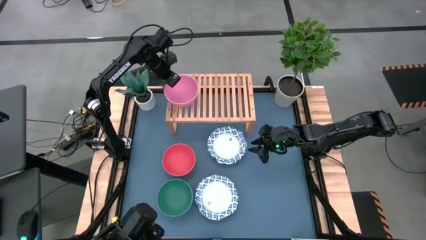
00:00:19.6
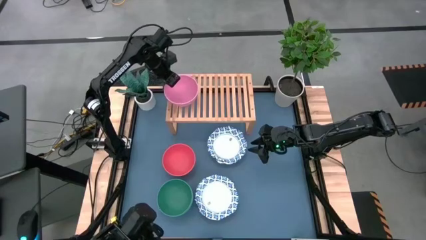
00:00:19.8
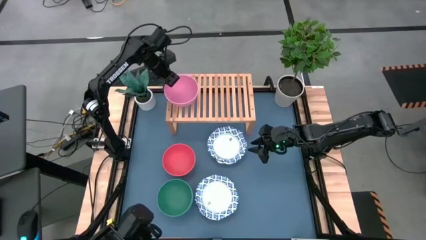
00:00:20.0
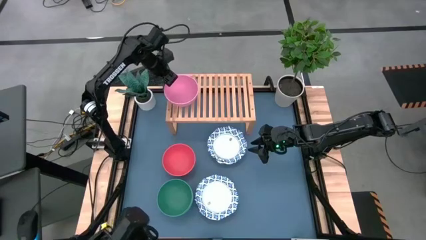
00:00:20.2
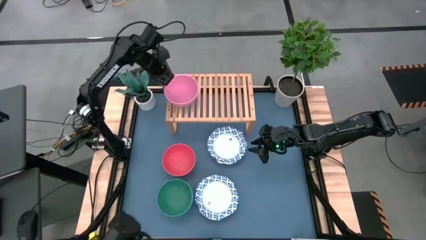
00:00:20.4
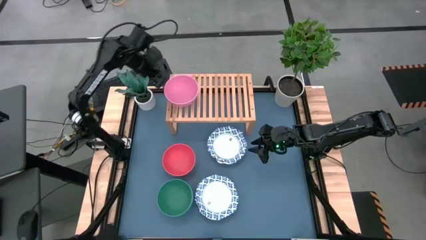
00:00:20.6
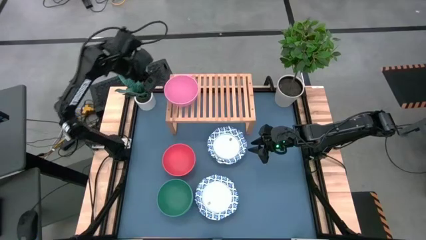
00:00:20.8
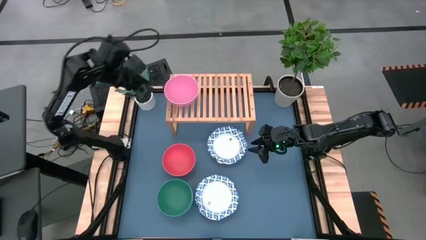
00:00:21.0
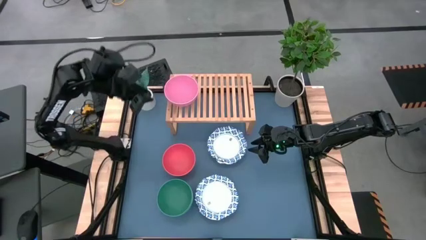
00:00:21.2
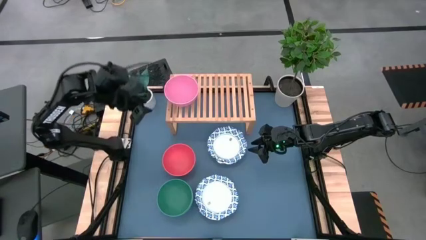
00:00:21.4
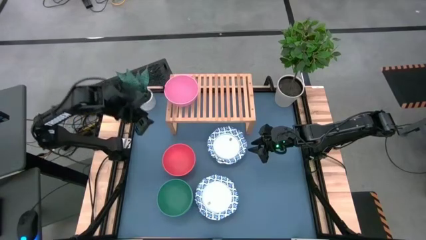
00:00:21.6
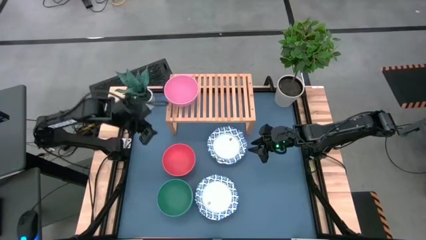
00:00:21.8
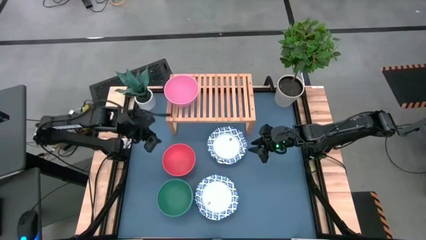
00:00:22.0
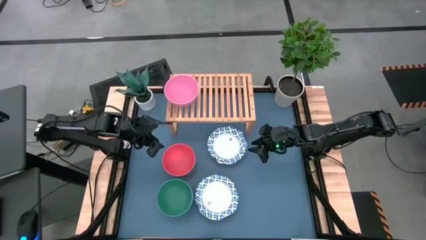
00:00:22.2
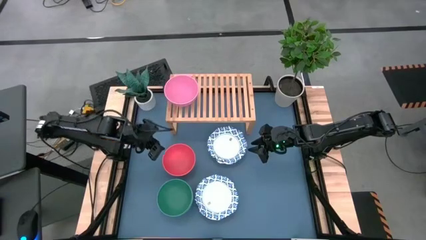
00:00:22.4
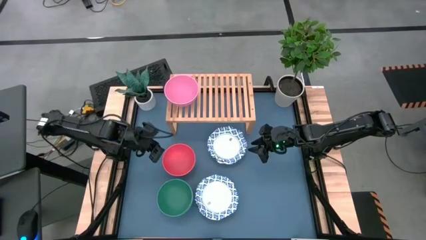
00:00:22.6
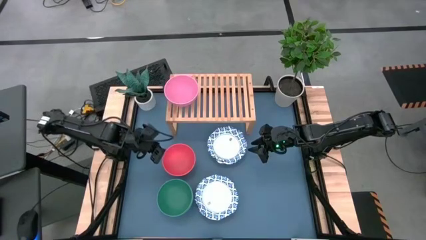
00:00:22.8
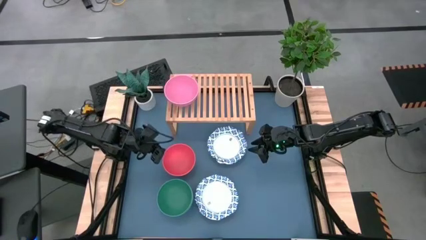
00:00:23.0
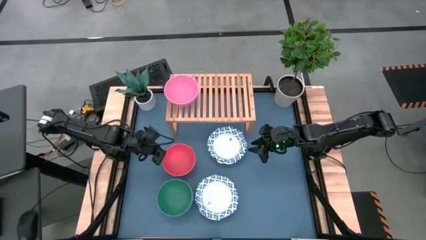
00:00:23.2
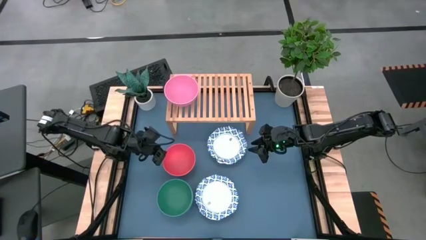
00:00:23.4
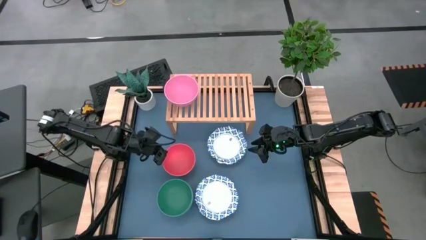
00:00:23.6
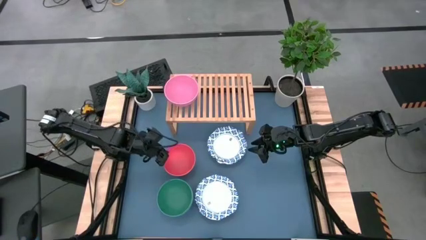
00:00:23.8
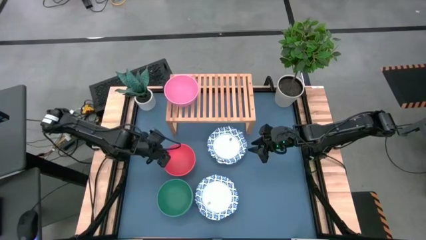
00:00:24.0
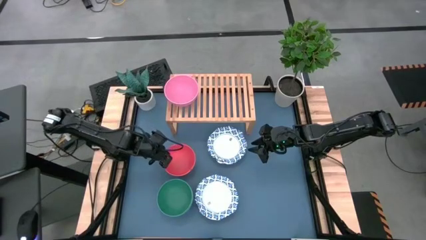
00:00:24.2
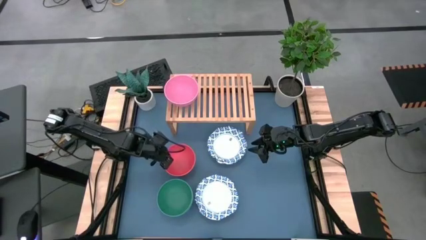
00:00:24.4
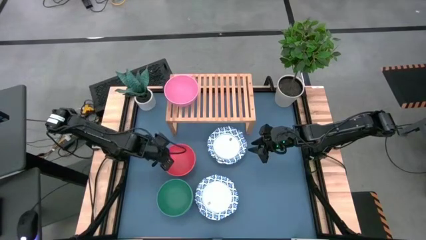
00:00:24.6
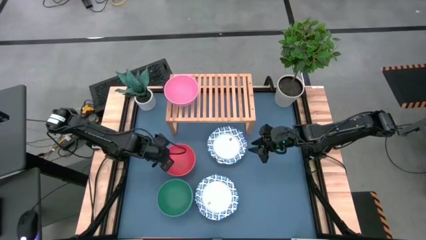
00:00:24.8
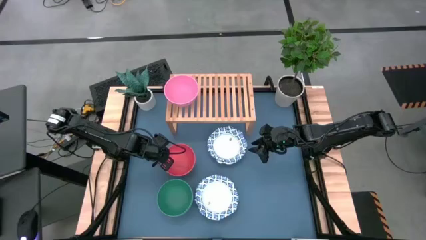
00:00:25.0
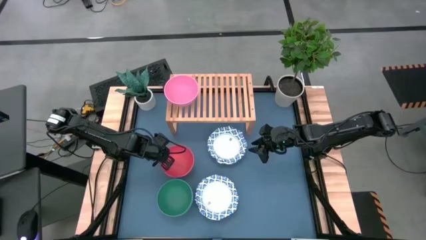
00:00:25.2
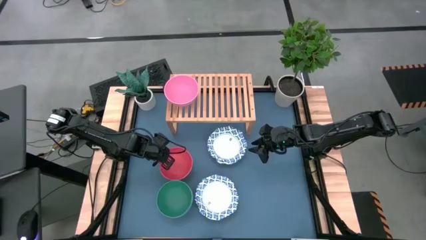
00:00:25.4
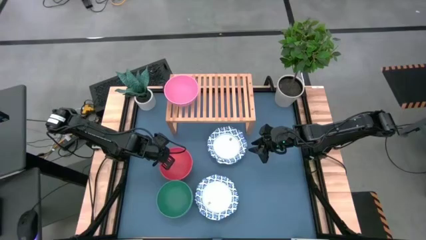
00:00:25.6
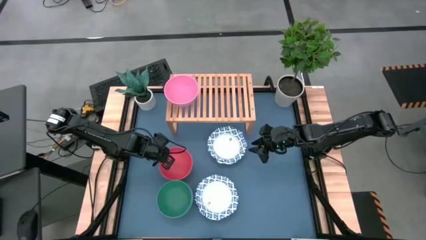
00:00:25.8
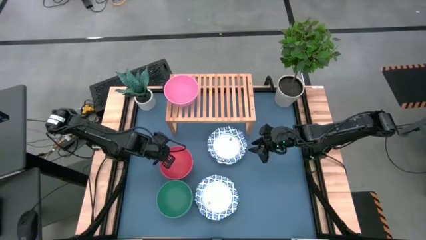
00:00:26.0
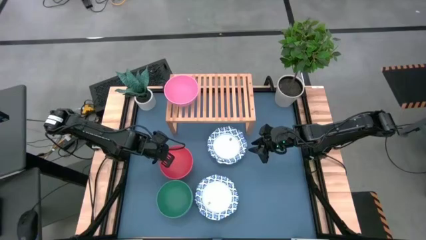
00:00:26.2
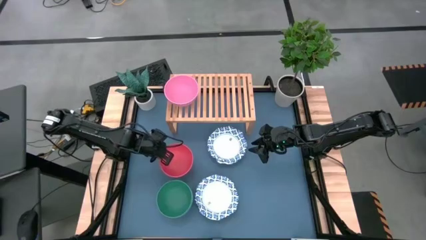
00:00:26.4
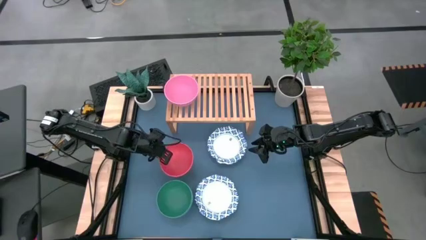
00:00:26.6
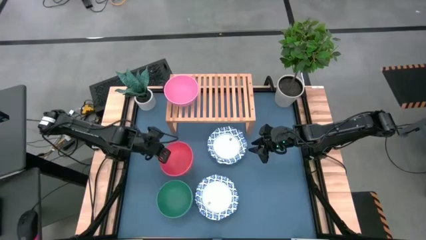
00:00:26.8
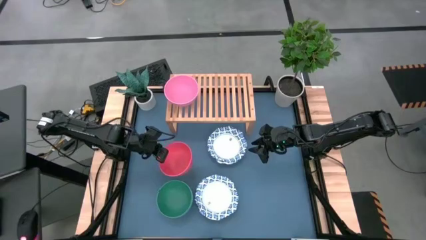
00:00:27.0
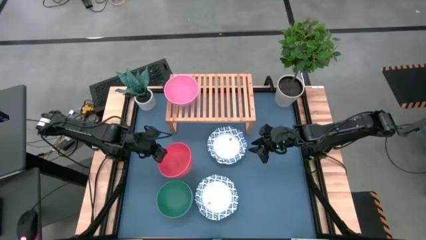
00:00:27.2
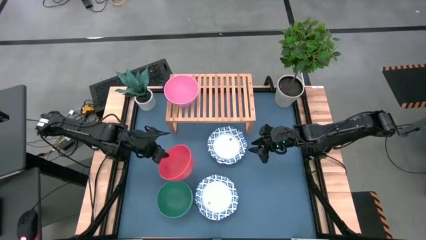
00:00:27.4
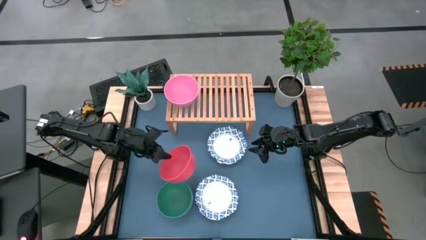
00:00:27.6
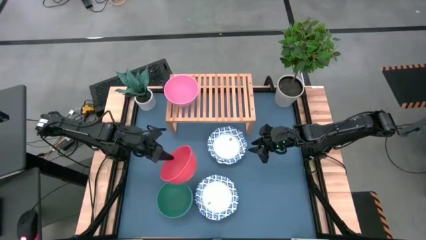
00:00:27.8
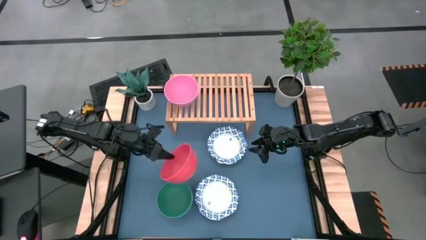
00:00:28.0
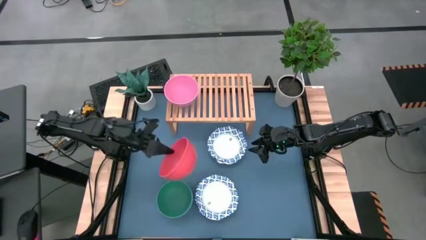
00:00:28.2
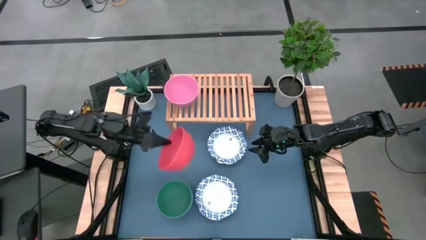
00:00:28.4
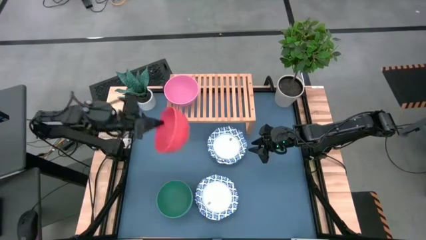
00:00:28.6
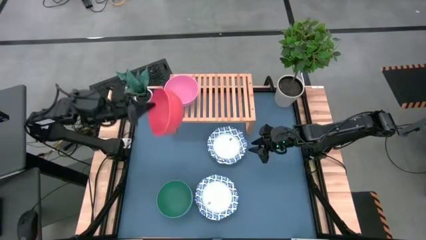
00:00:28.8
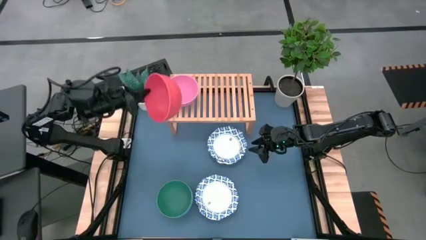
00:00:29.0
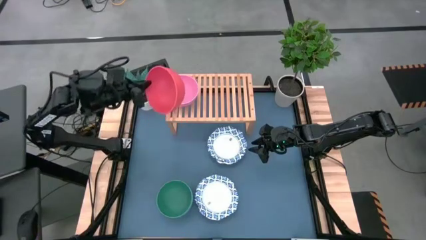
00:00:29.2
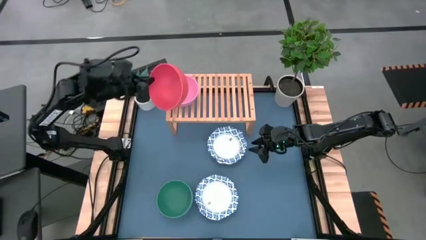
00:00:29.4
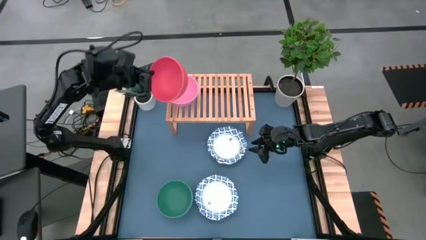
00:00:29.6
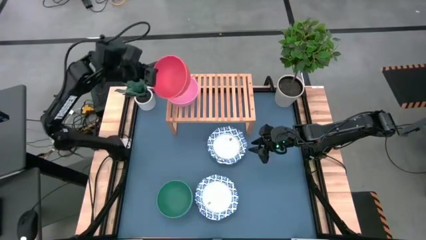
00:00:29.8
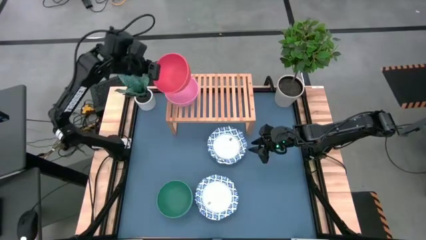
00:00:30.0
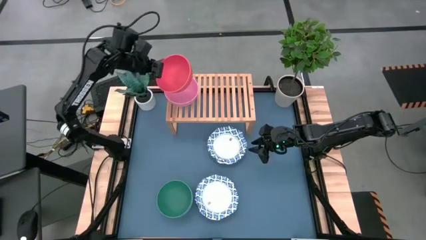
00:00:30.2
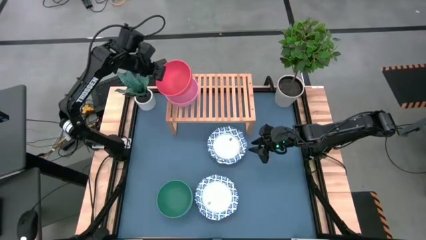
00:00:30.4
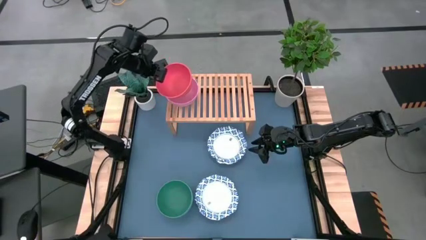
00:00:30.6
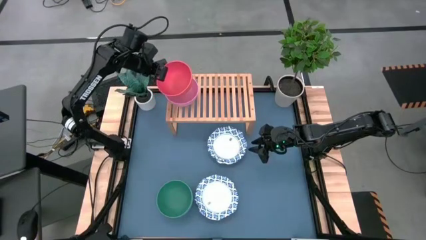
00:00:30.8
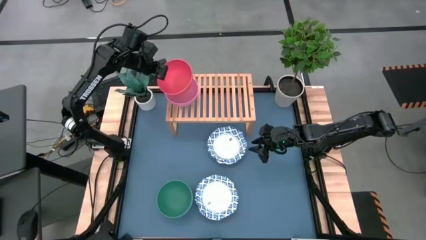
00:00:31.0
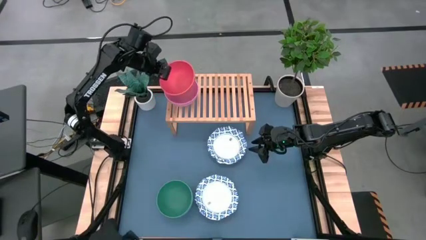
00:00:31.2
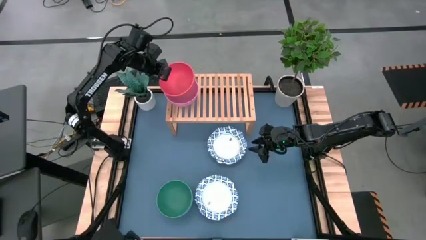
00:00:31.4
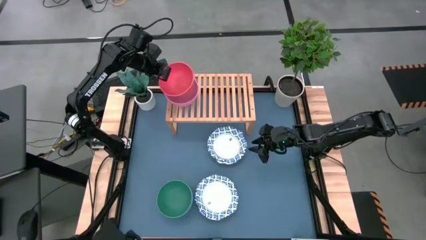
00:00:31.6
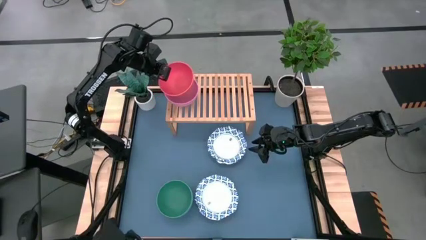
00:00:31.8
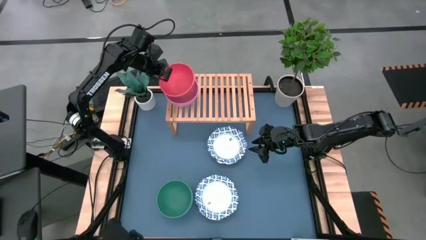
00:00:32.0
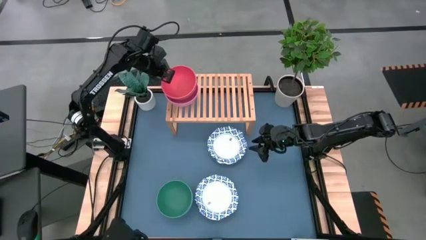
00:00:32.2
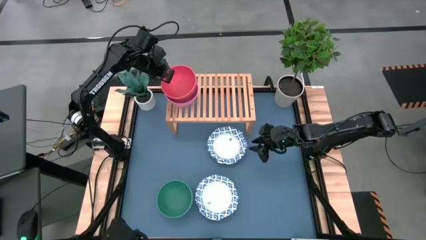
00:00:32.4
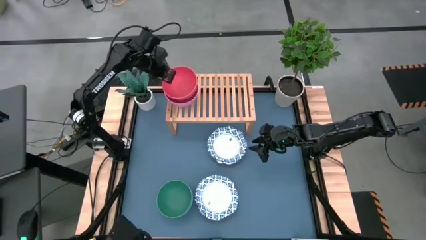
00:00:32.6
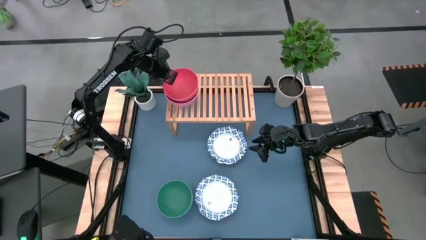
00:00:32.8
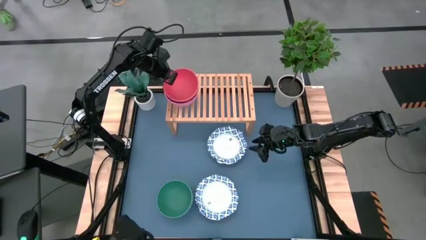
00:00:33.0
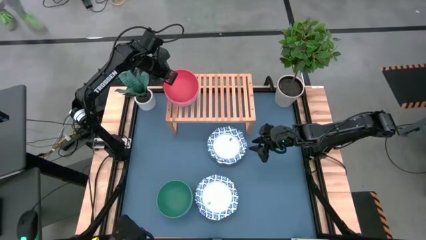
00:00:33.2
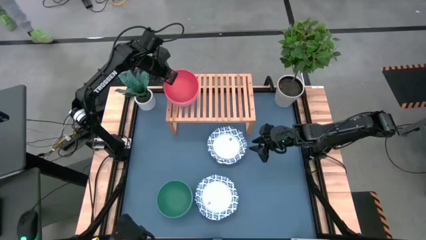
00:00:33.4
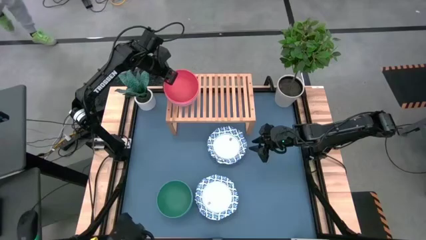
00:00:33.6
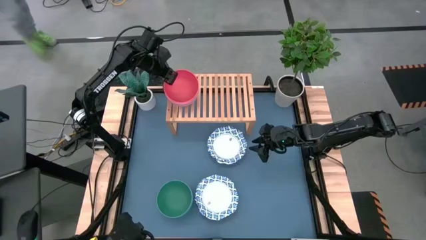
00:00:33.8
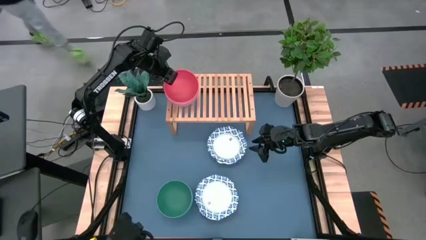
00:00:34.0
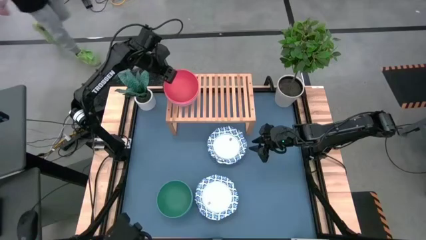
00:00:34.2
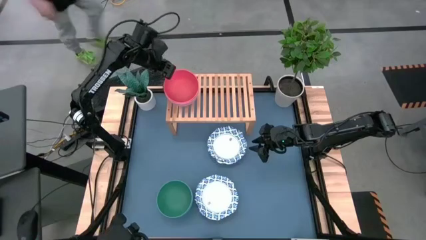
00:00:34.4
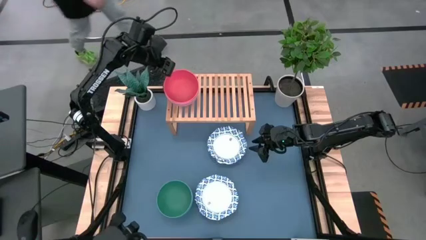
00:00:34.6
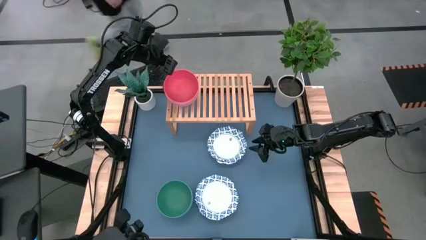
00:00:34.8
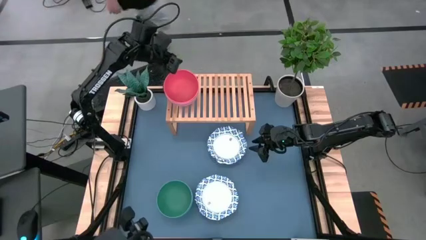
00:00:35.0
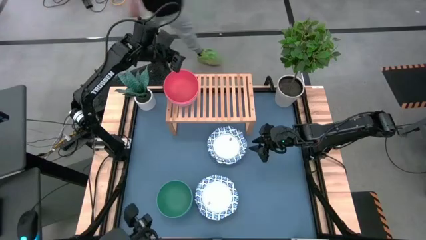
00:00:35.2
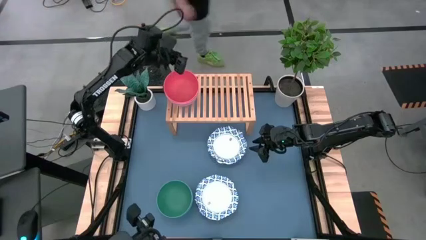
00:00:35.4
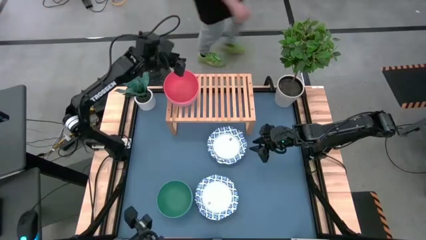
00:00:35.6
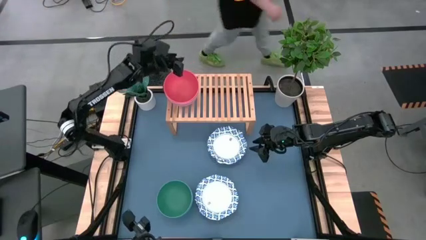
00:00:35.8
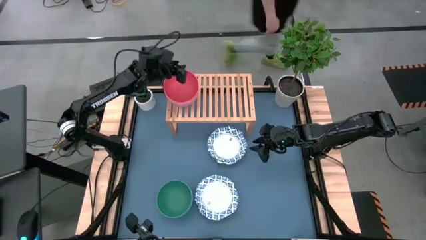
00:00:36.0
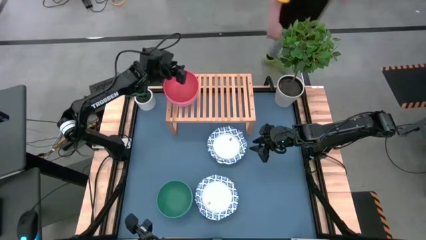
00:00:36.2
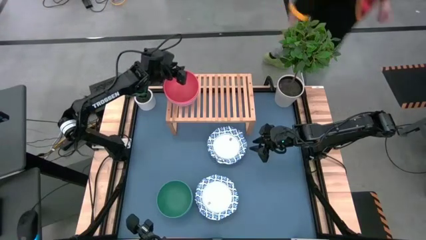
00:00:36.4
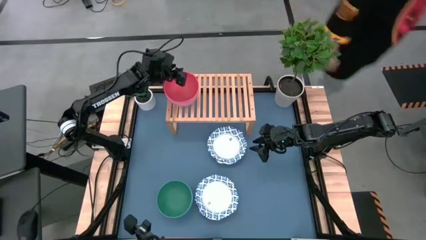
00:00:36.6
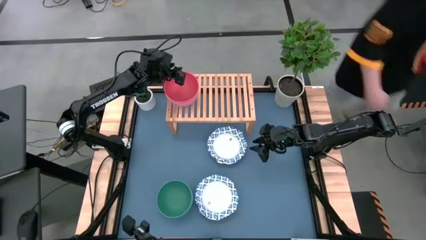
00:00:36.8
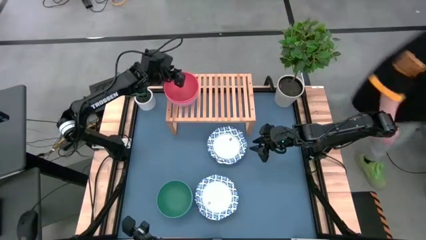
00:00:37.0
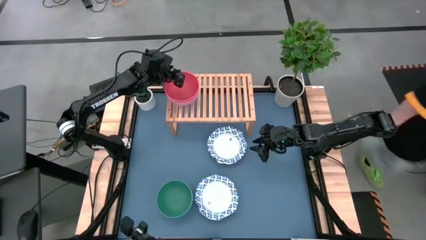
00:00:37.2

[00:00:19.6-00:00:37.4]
Task: Place and stack bowls onto a shelf
Stack the orange bowl on top of the pink bowl on the shelf
